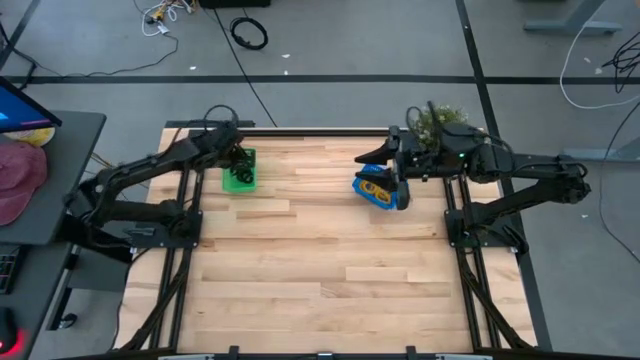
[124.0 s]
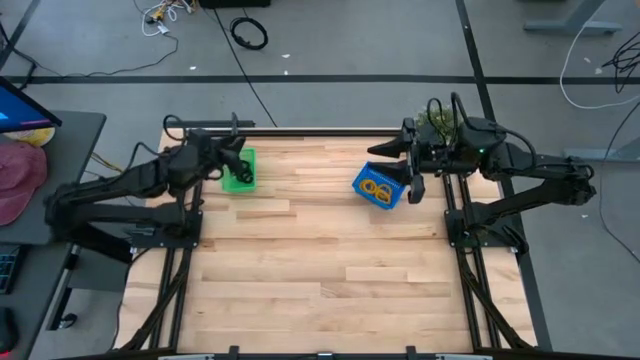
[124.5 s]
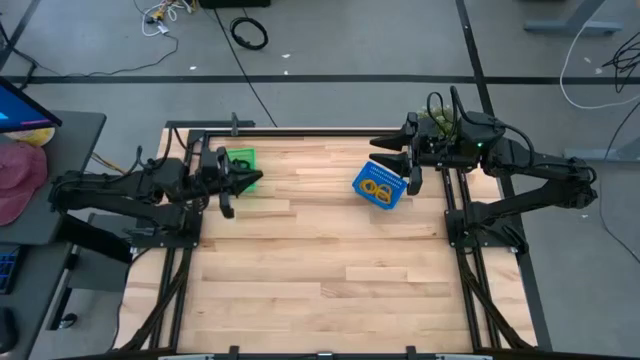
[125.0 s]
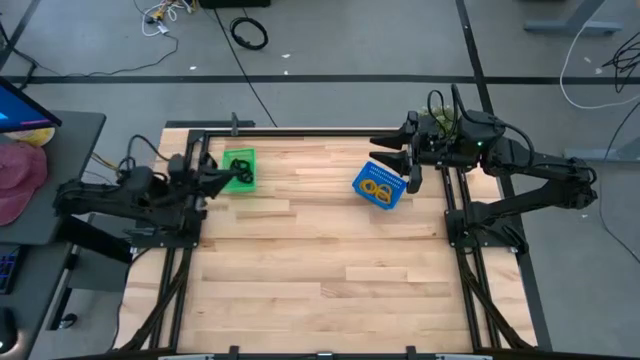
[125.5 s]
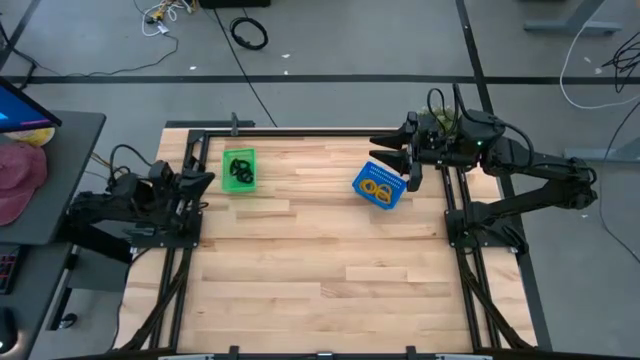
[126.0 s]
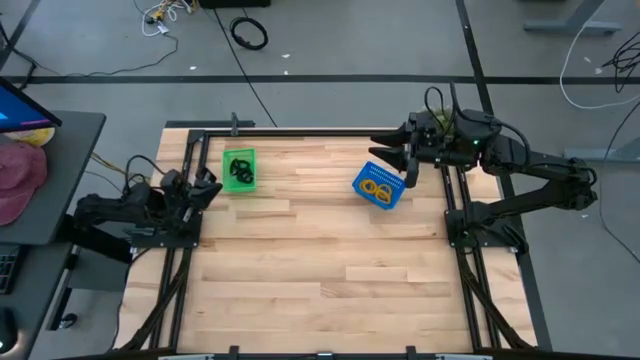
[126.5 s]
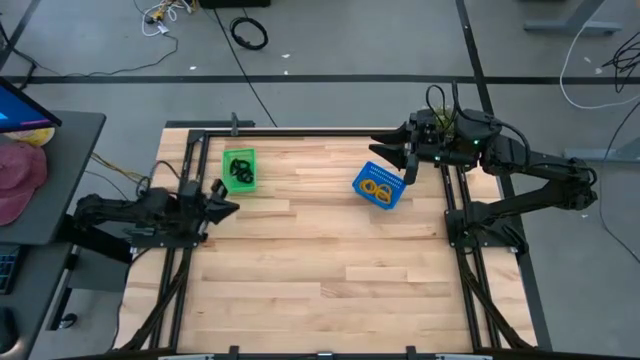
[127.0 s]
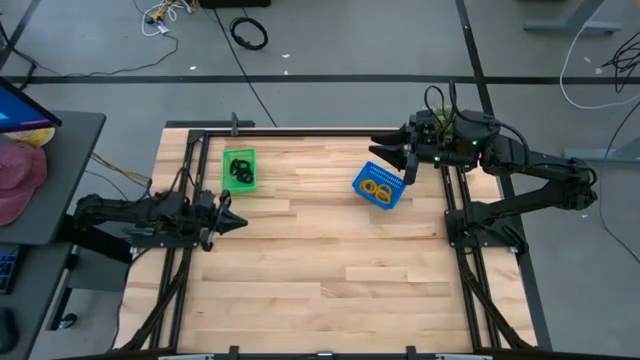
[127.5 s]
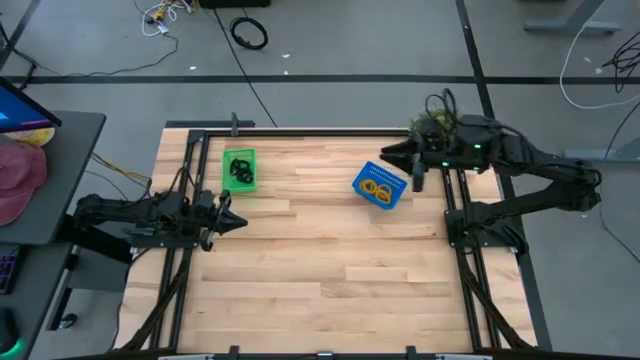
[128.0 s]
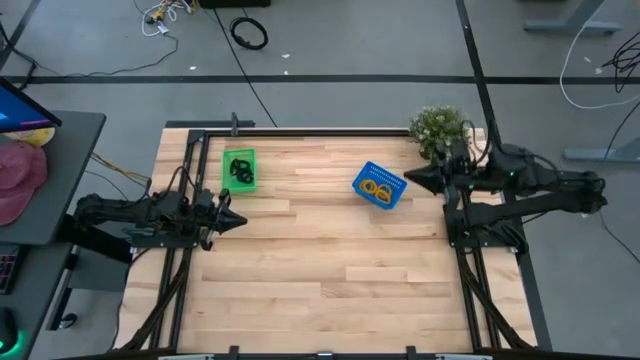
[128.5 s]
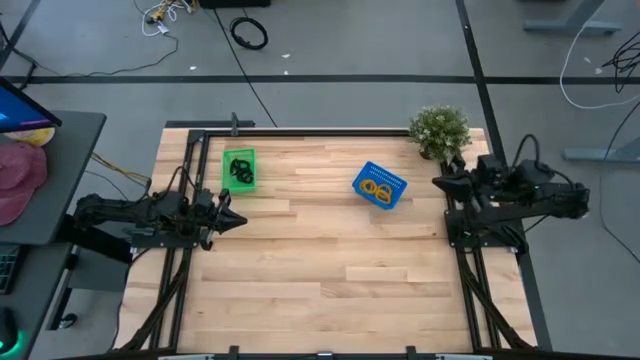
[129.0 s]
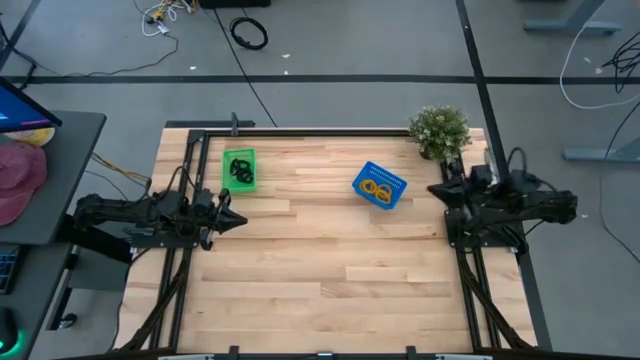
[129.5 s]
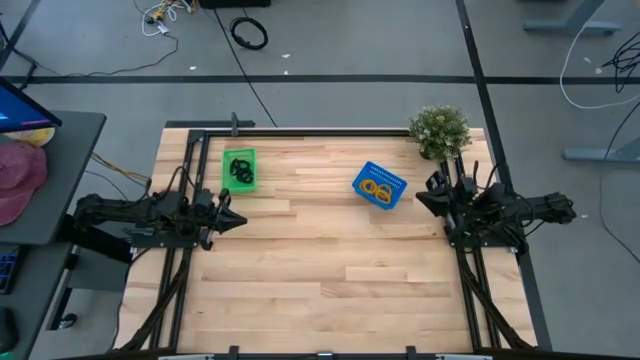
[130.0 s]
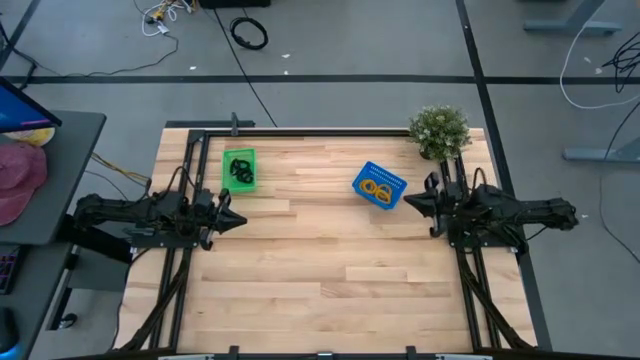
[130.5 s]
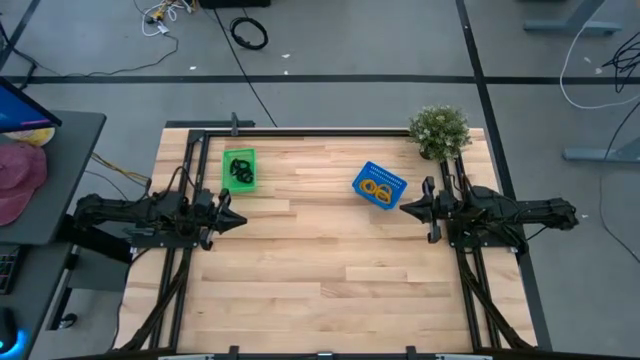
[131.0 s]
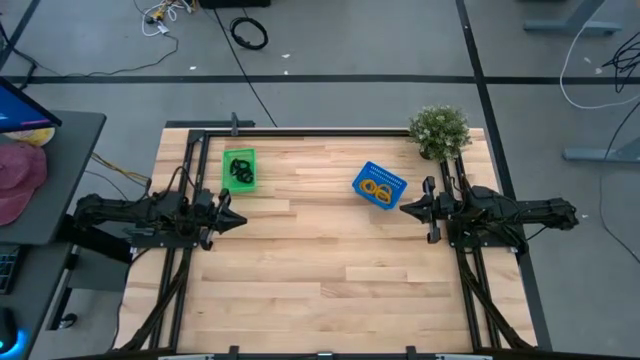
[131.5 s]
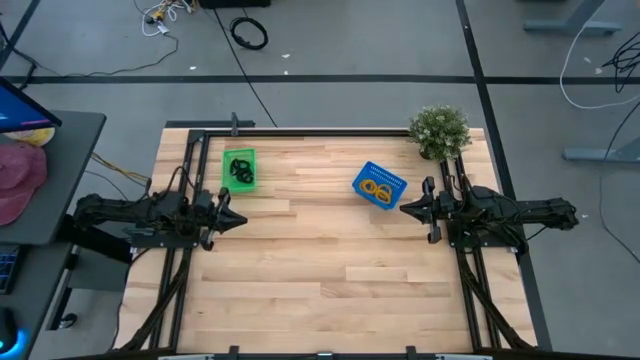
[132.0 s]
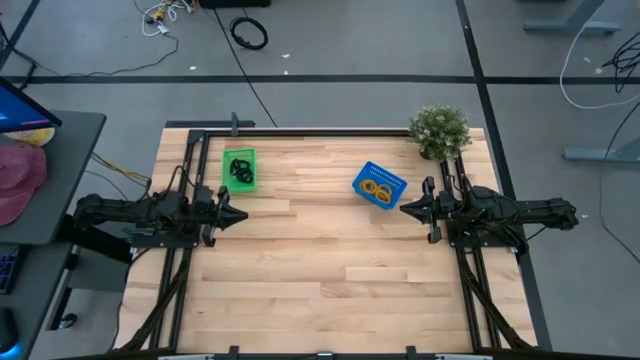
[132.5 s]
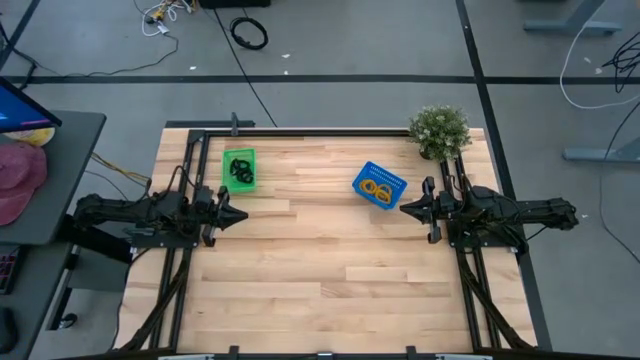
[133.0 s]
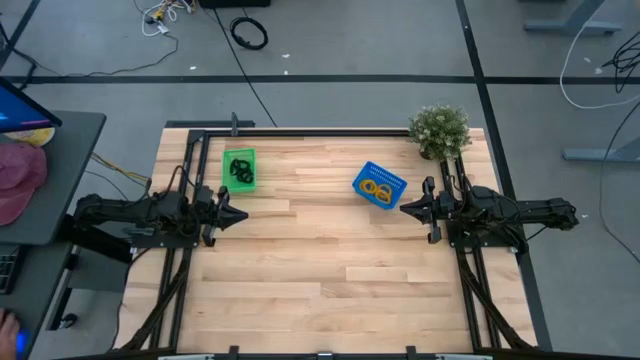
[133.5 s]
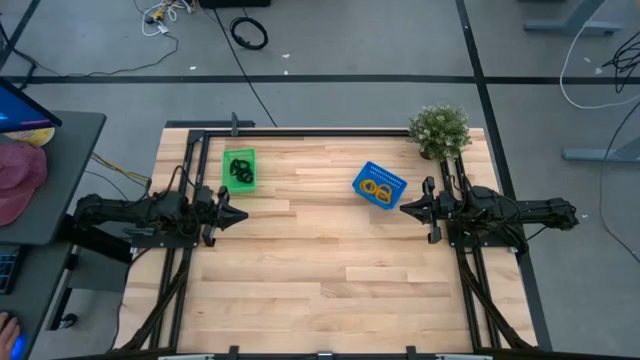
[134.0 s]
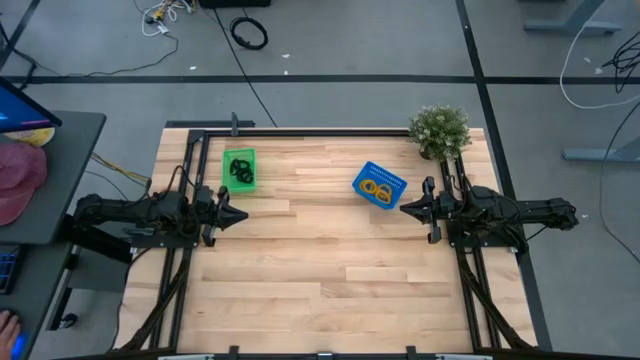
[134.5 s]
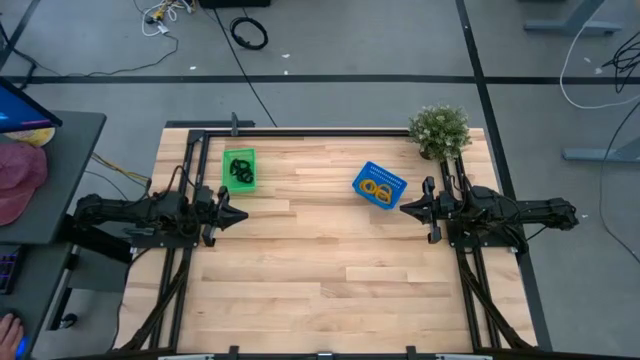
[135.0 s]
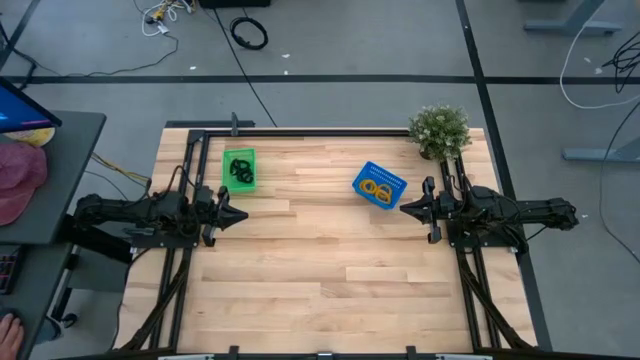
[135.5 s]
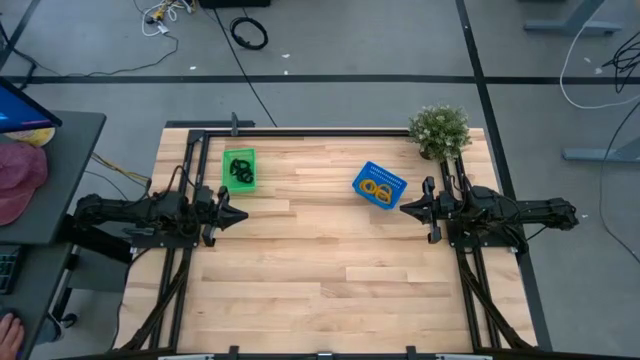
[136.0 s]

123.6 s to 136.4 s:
Task: Sort spring keychains
Return to home position

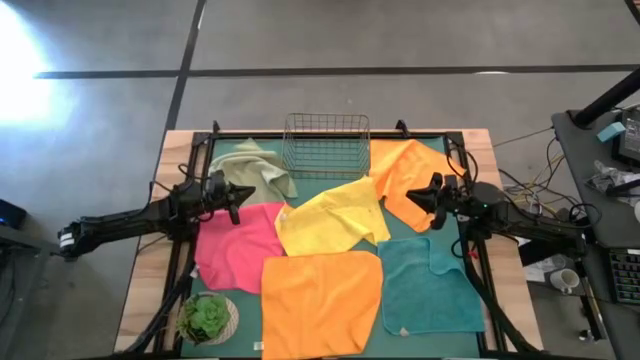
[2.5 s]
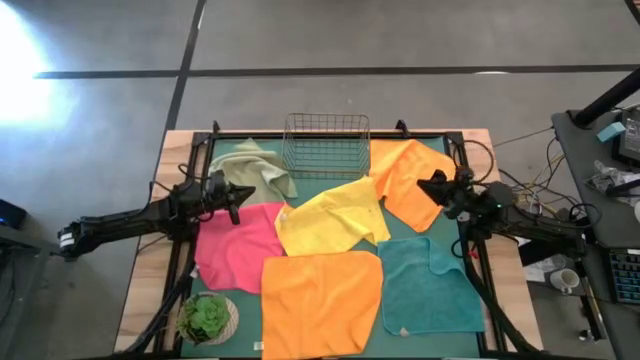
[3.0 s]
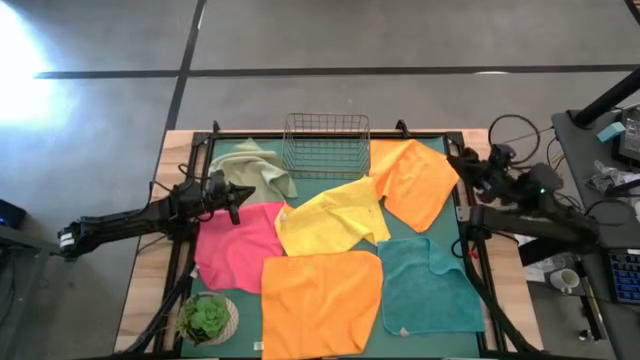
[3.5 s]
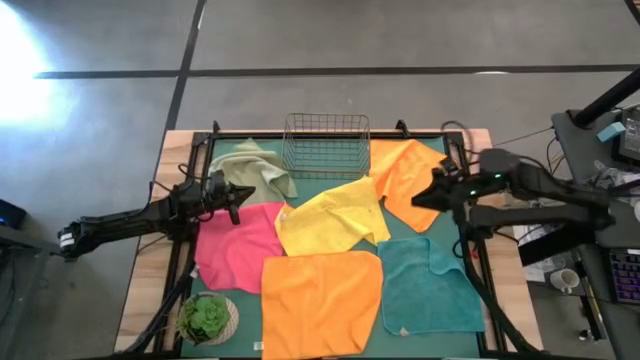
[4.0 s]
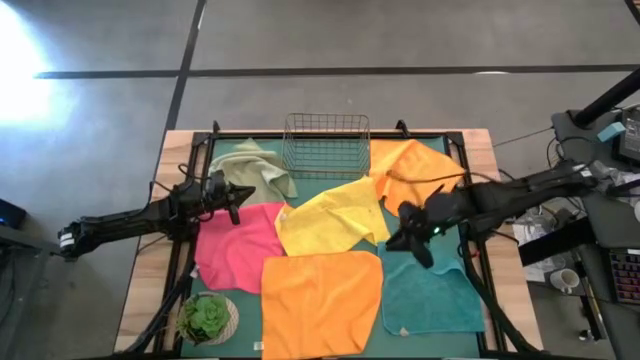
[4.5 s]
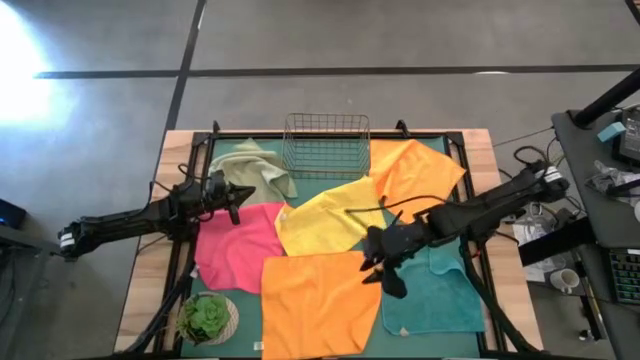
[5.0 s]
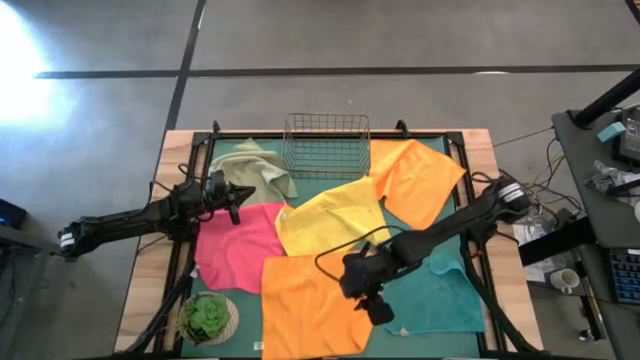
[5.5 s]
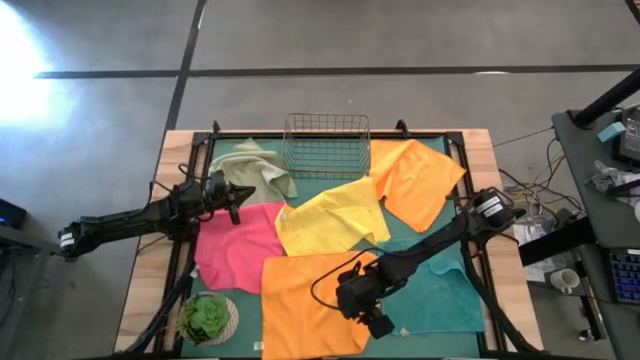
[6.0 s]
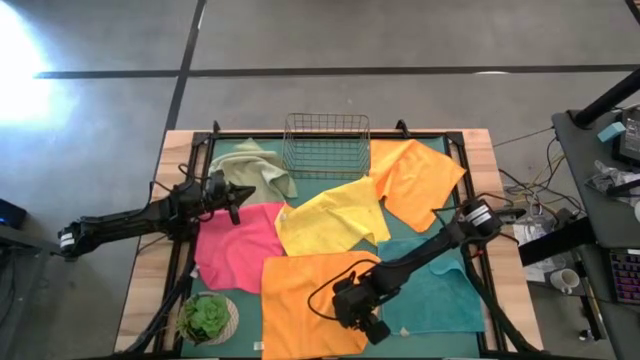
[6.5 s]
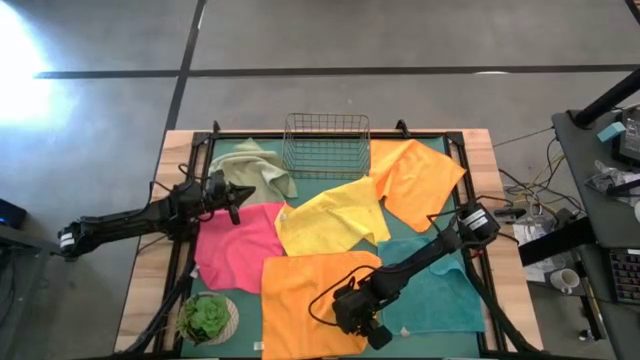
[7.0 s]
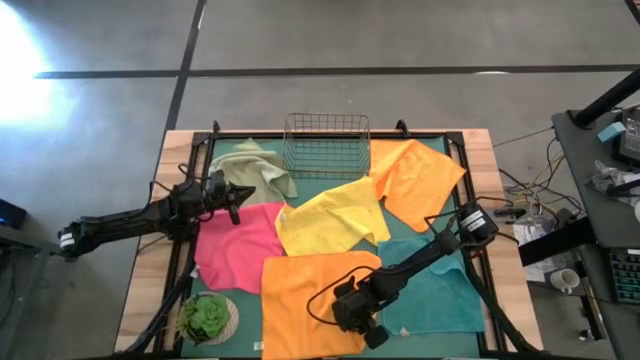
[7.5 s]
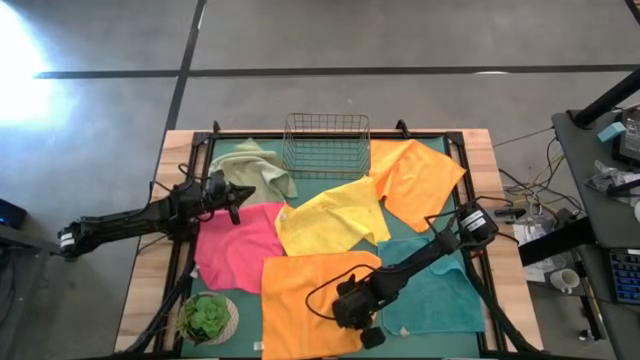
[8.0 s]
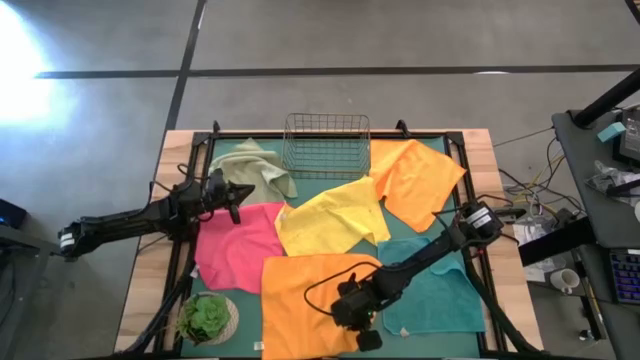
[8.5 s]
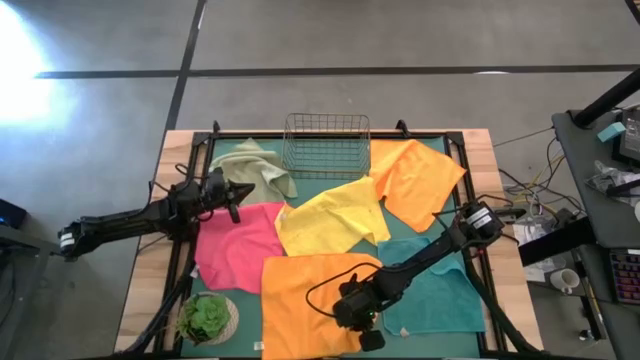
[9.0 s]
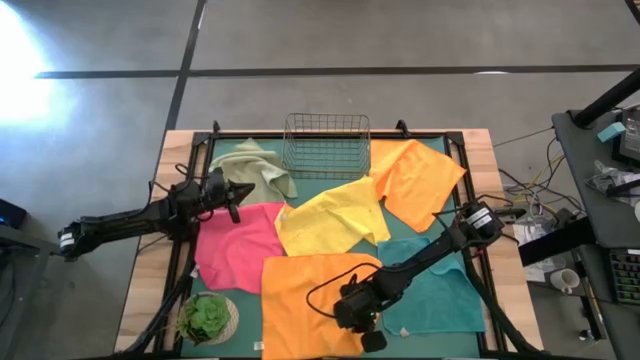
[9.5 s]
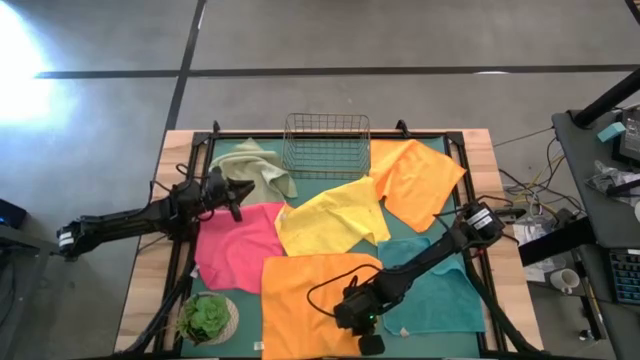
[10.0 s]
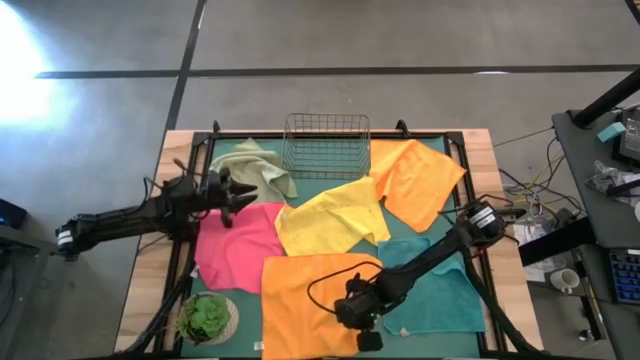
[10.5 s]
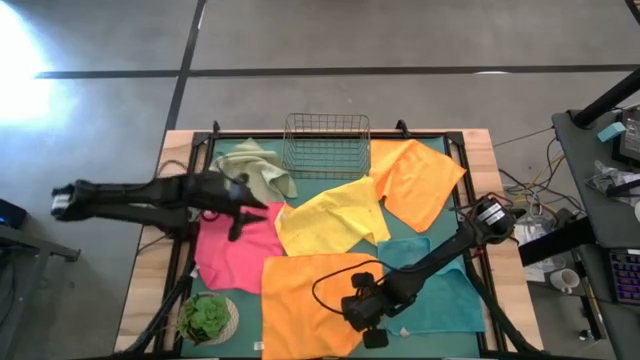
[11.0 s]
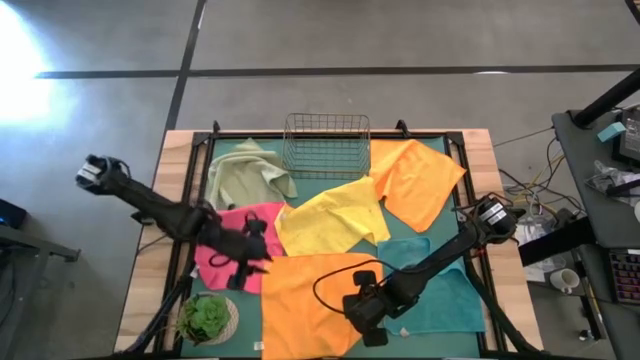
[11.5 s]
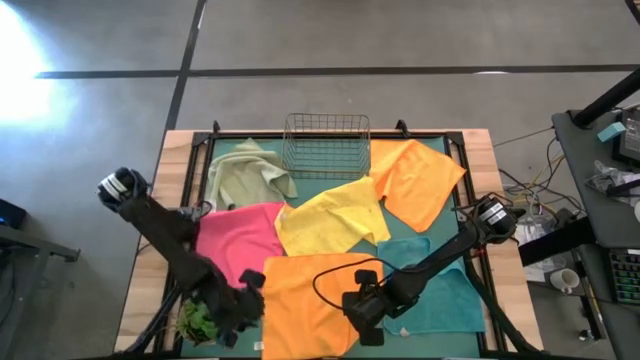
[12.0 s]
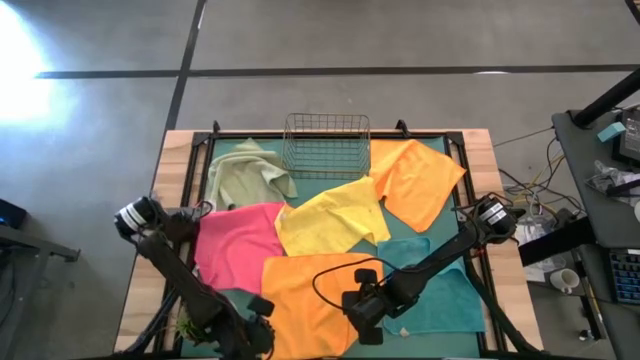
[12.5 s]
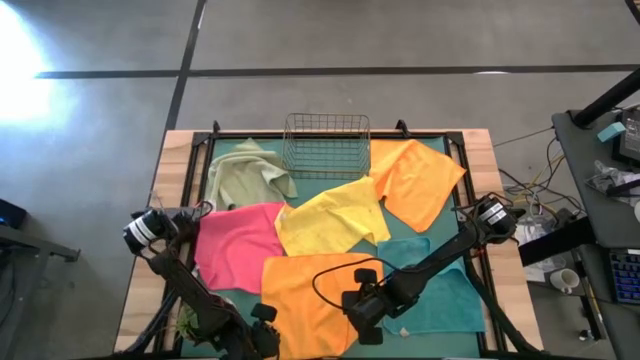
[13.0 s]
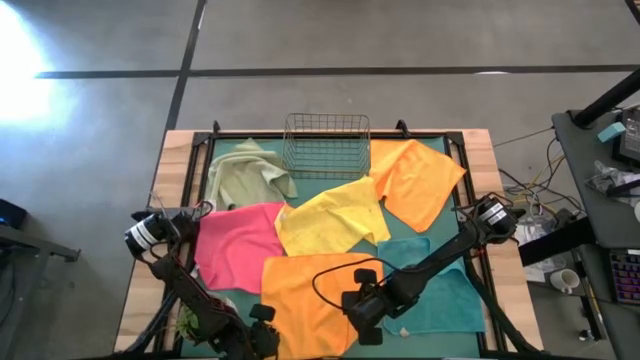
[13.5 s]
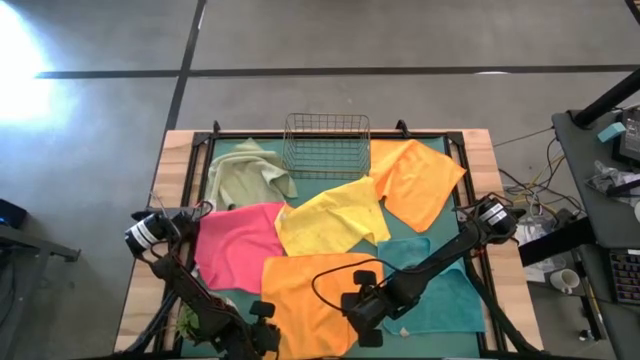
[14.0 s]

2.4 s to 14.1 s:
Task: Fold microfiber towels
Fold the bottom orange microfiber towel
